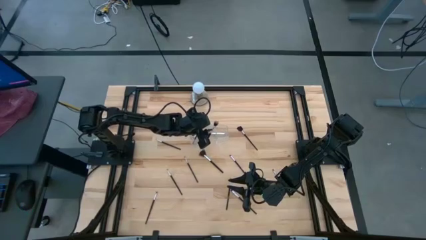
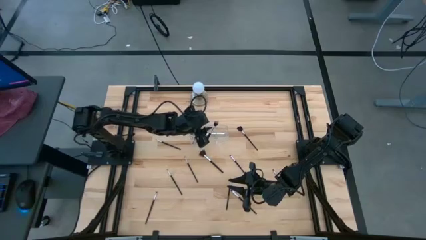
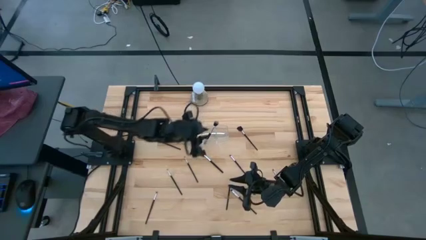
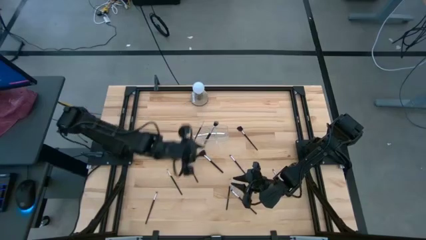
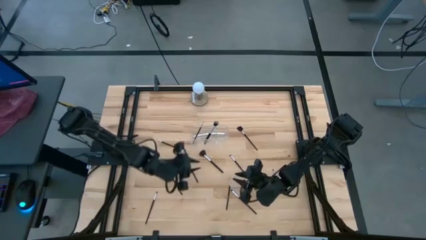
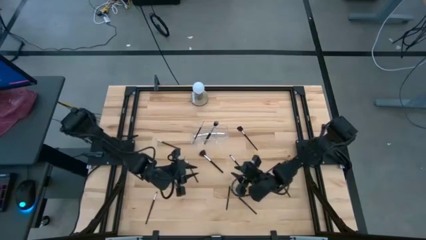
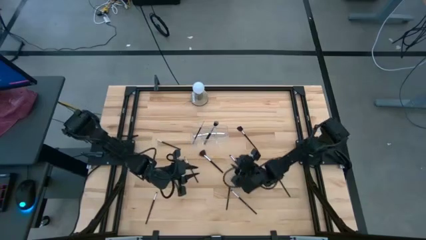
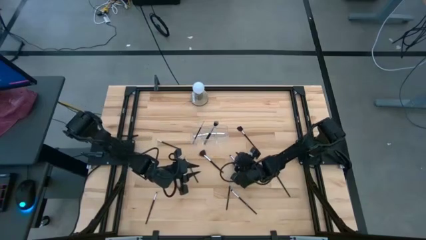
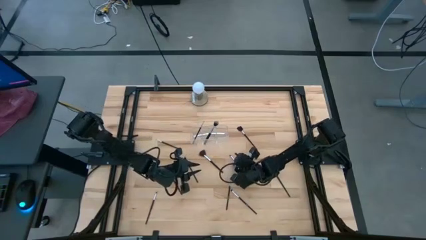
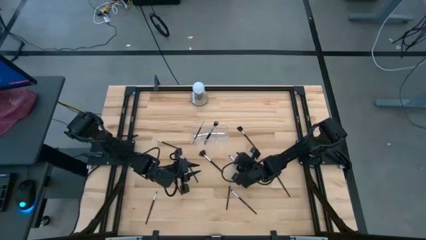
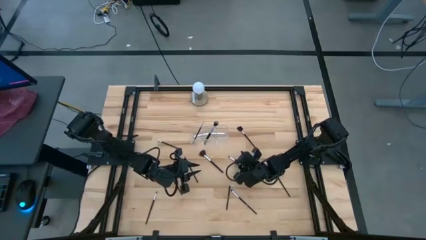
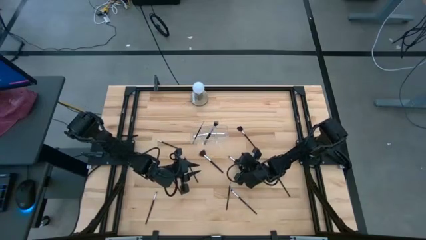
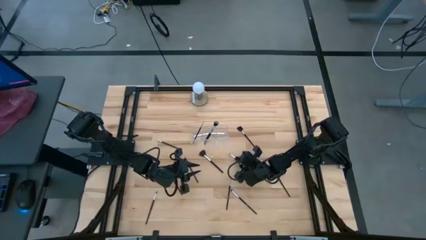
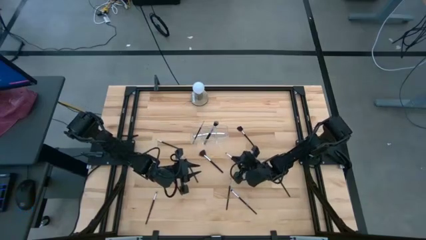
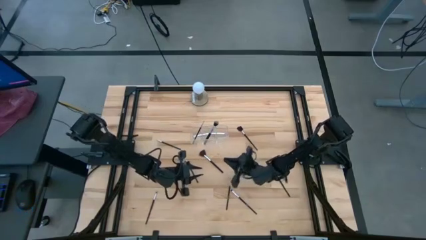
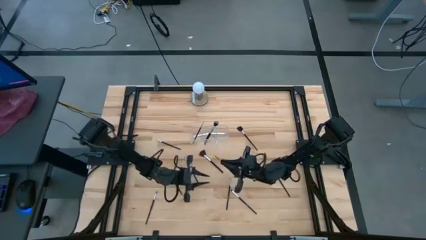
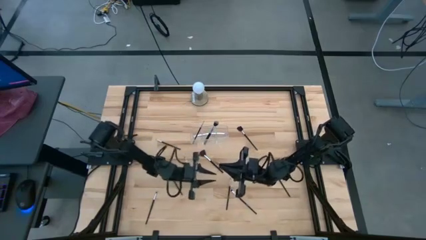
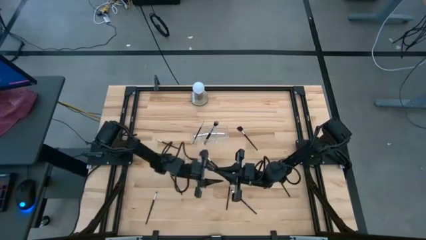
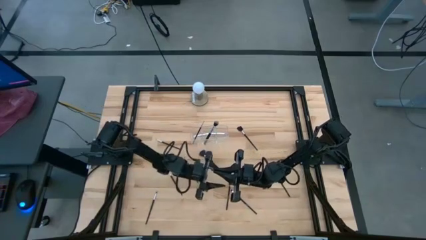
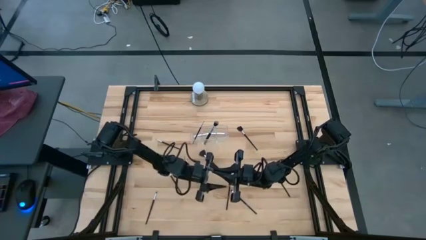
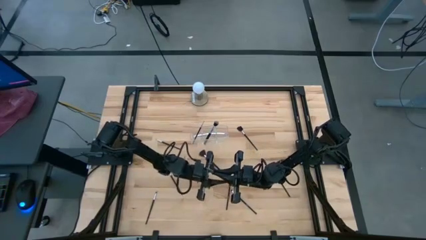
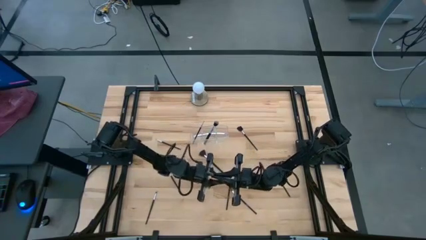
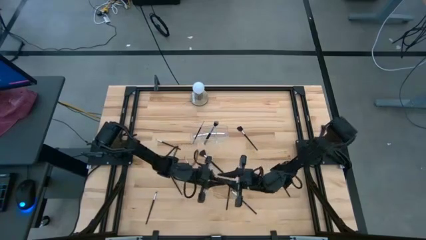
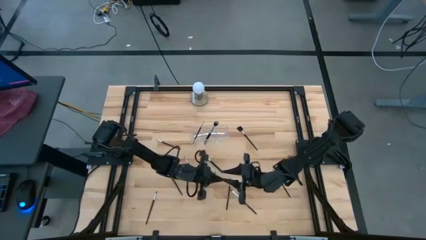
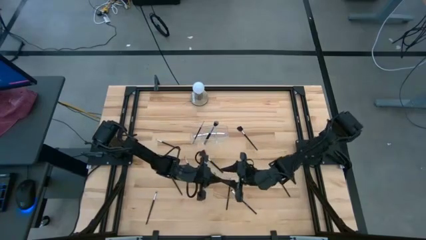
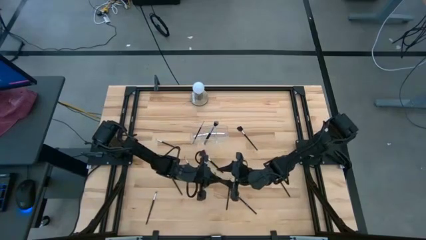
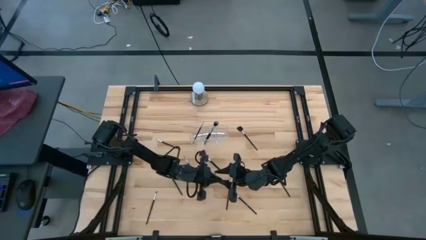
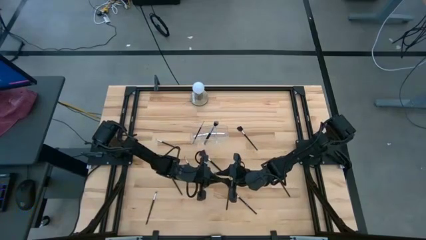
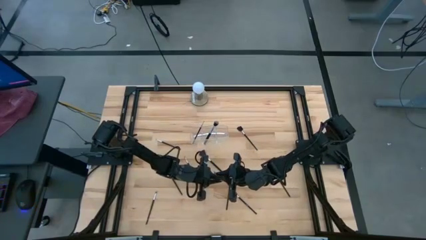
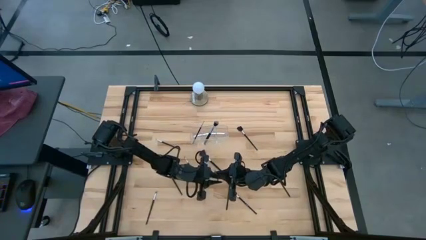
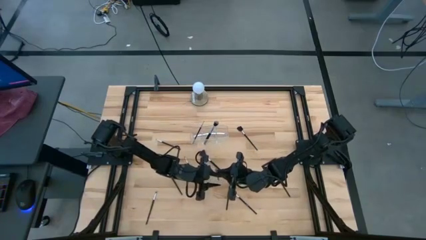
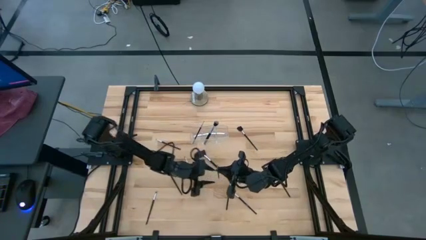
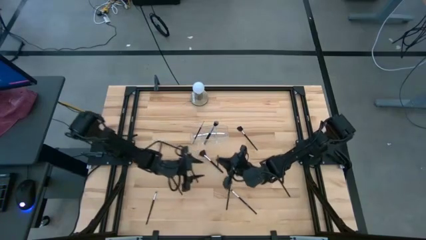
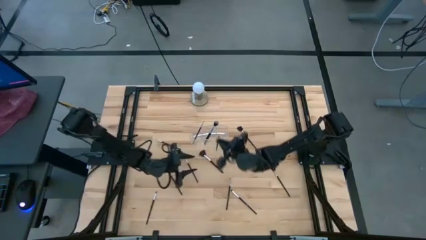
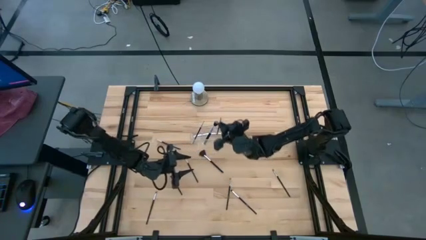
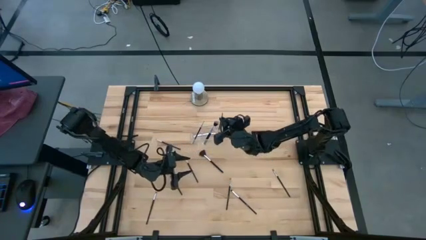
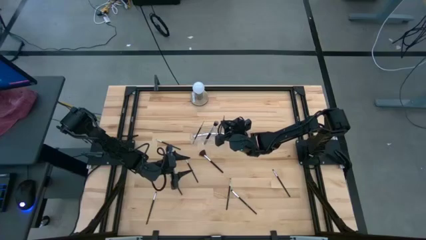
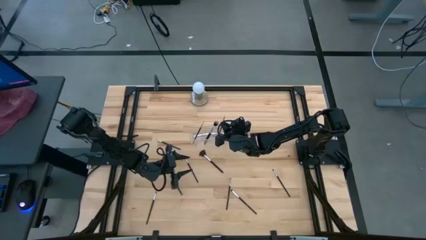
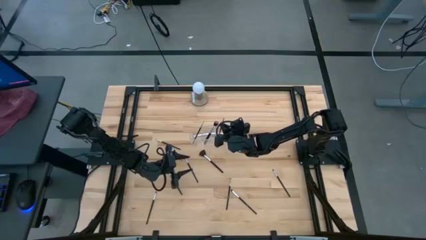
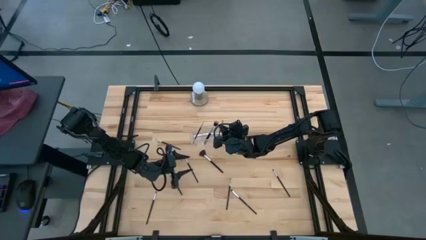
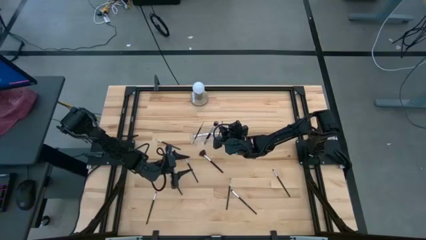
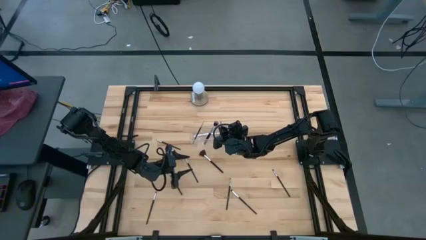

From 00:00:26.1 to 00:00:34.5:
Task: Put items in baskets/containers
Put the eyeshadow brush into the transparent organizer

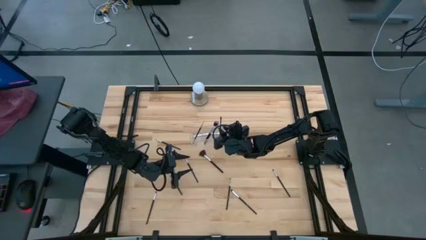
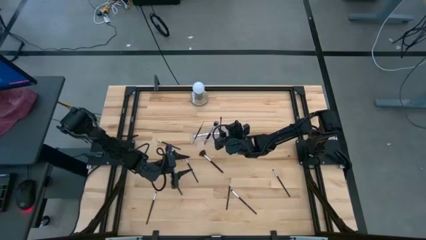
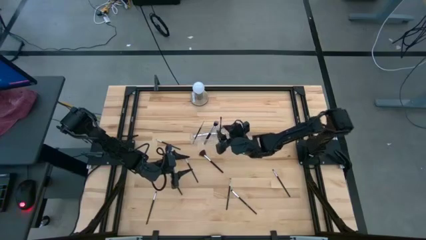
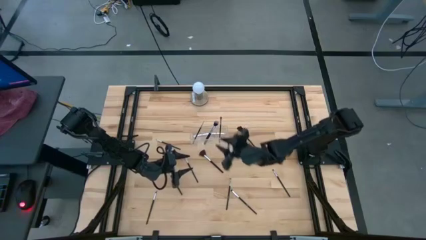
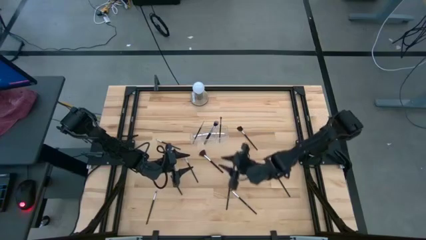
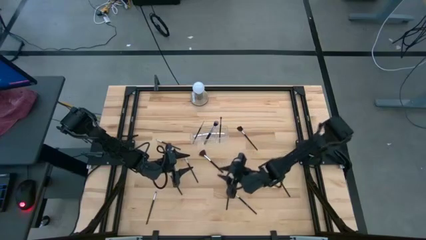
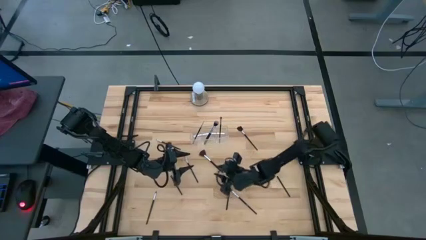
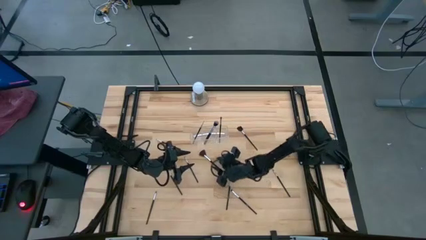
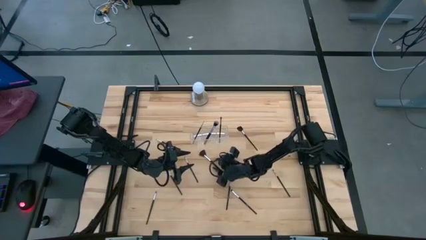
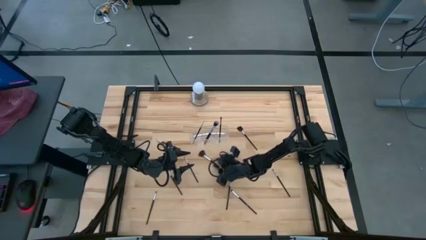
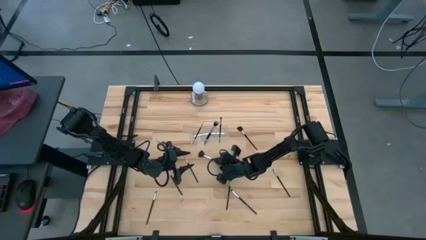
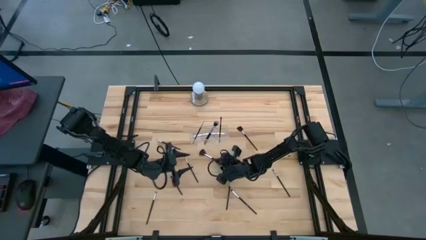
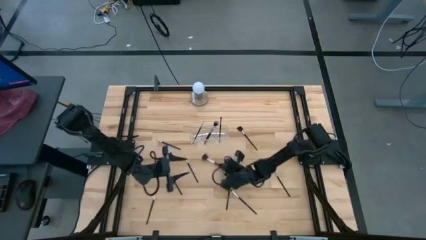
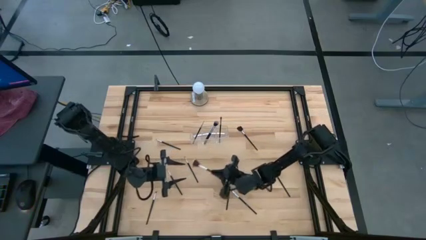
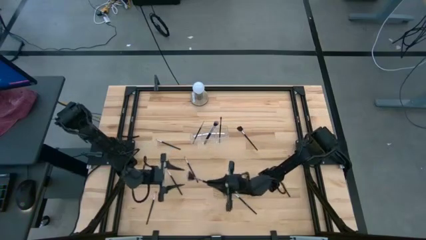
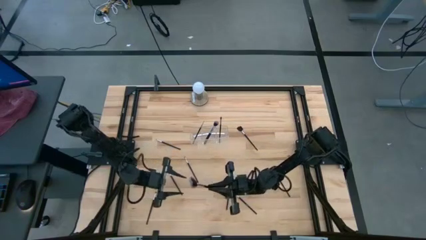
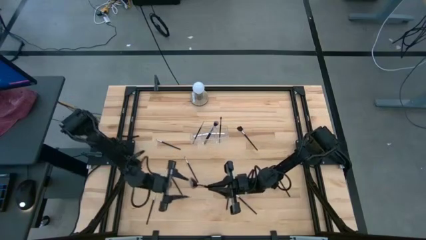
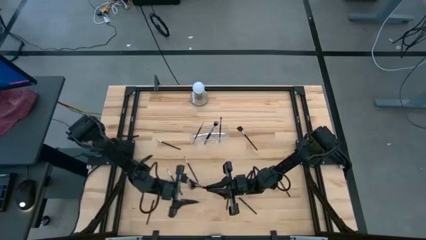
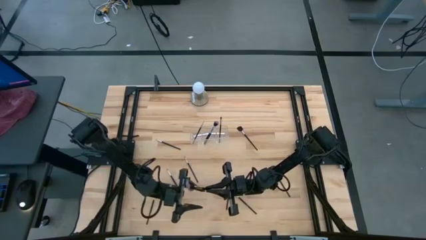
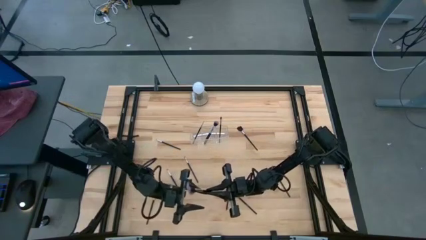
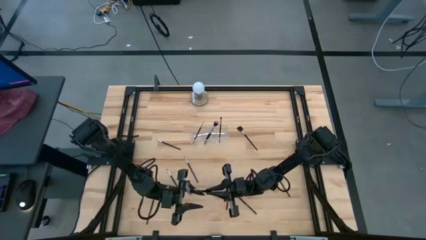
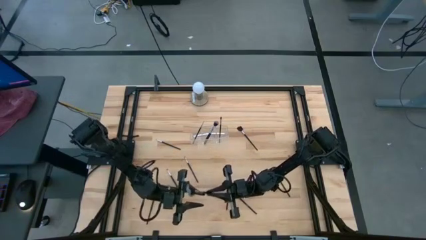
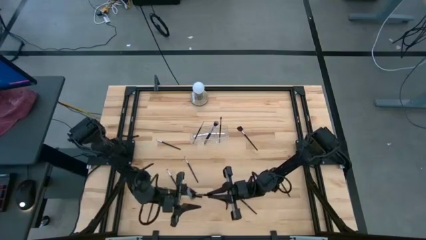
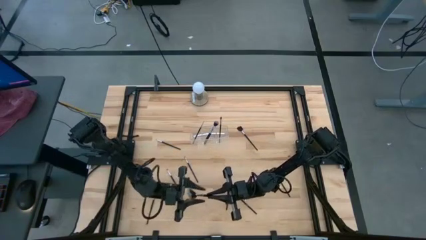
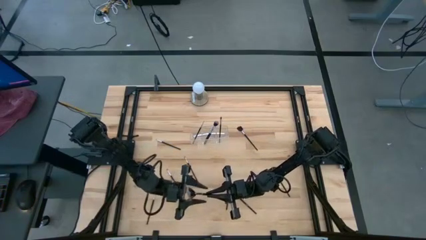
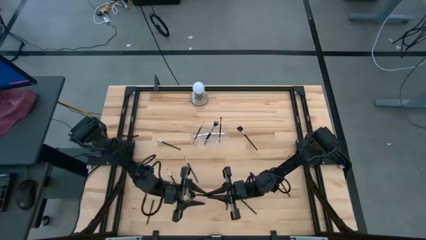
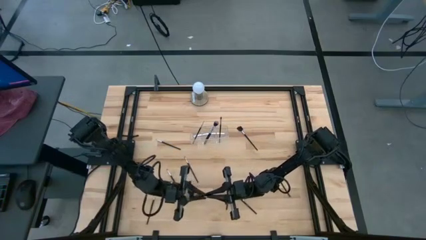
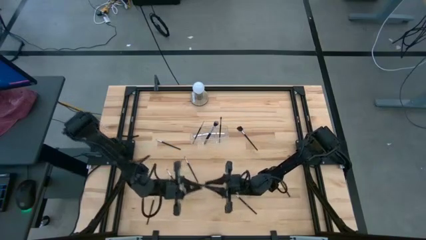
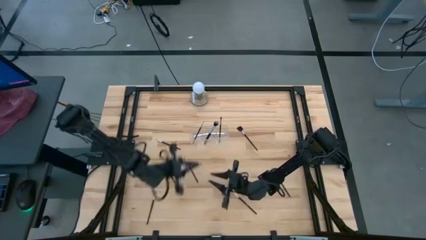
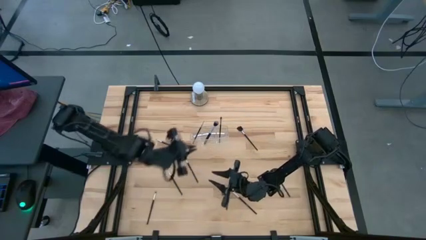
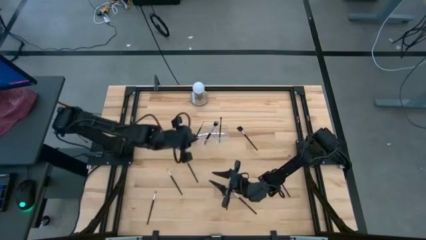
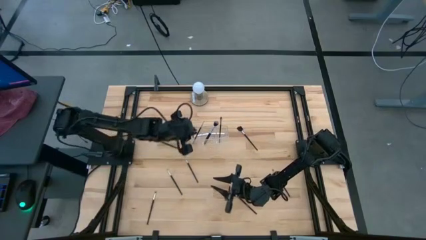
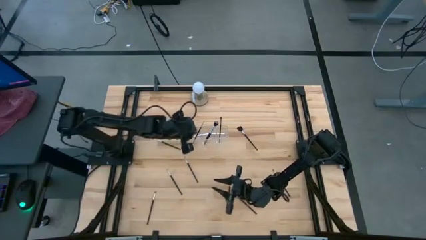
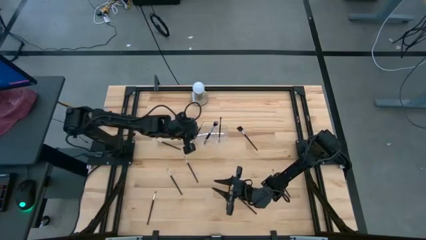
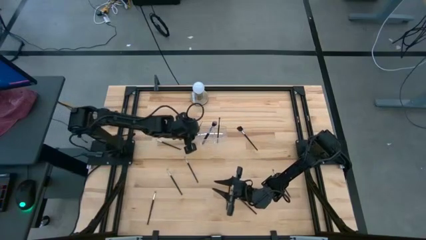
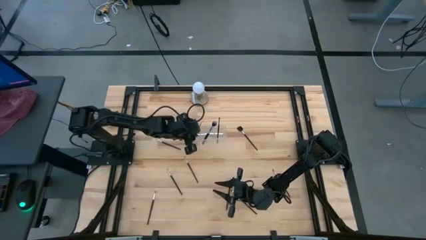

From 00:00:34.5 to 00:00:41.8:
Put the highlighter brush into the transparent organizer

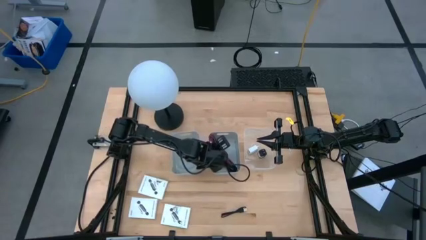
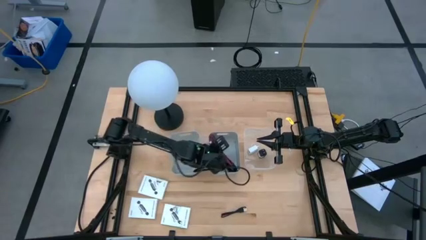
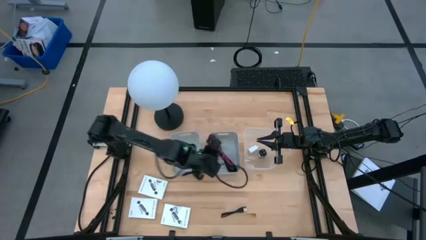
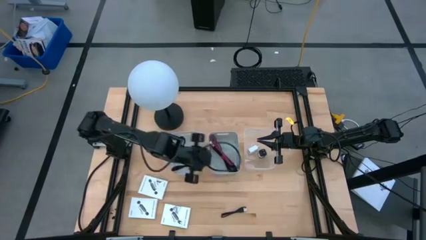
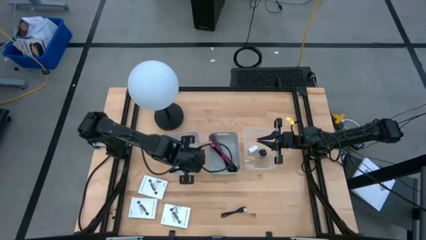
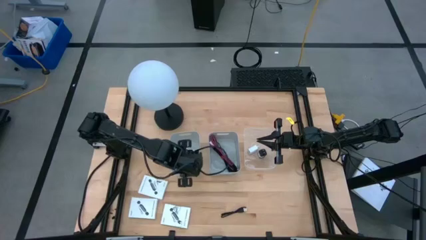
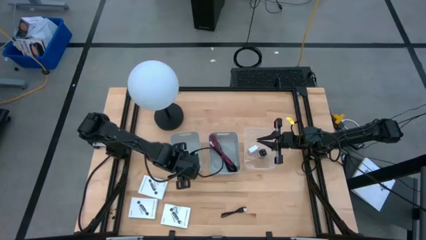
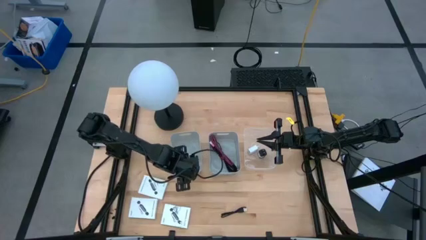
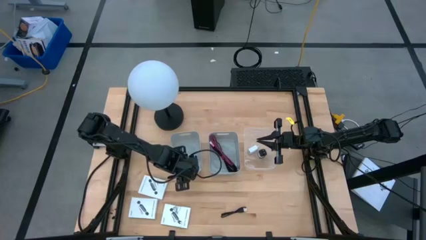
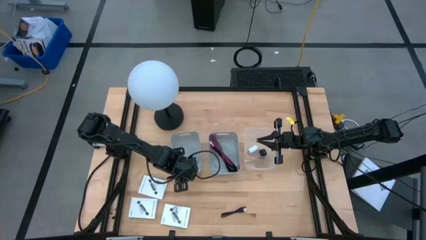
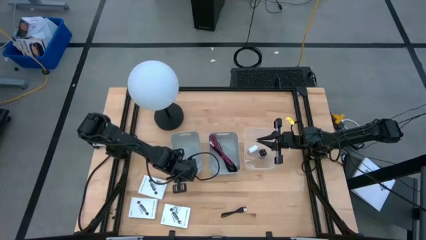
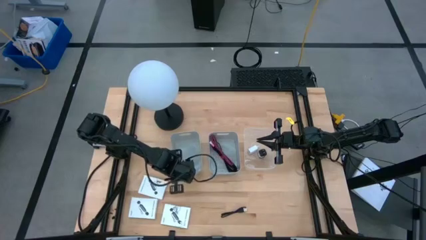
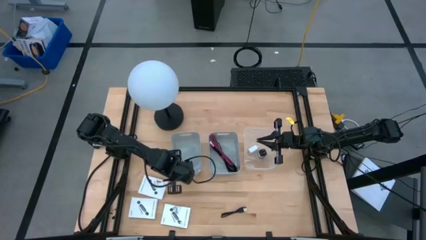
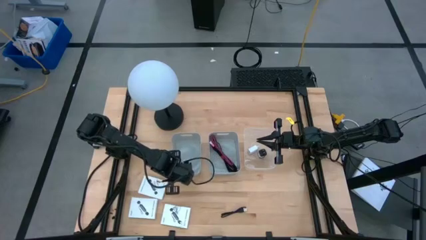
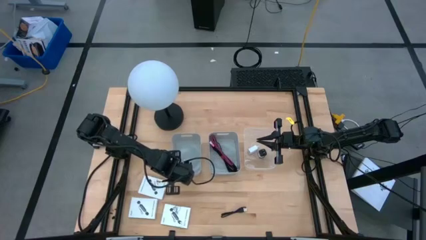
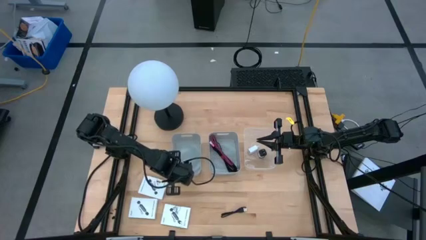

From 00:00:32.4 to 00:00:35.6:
Task: Pick and place items into bin
Adjust the left gray bin
